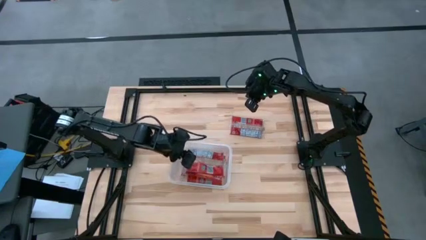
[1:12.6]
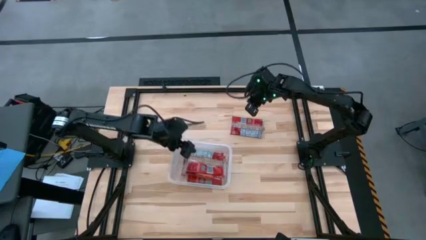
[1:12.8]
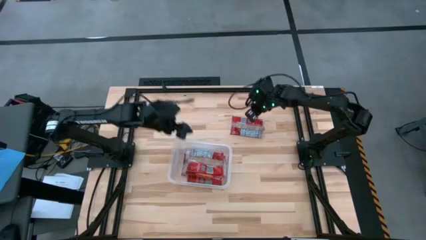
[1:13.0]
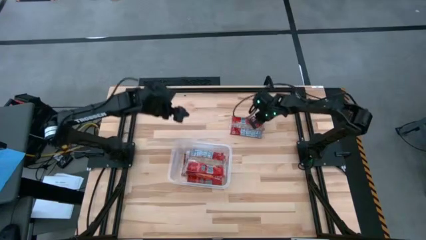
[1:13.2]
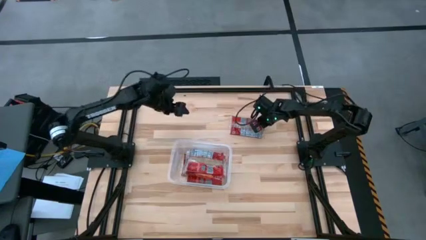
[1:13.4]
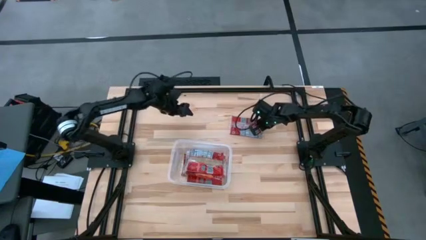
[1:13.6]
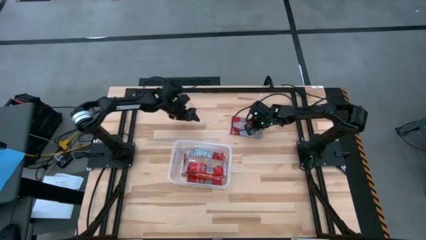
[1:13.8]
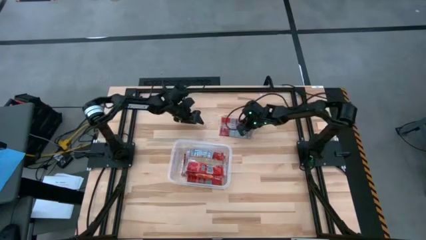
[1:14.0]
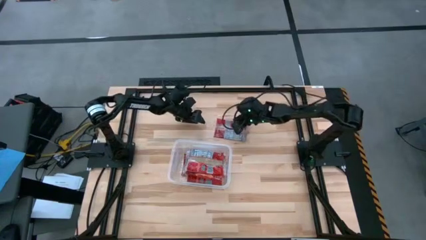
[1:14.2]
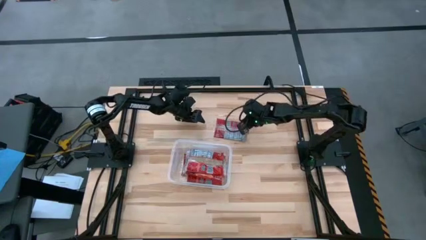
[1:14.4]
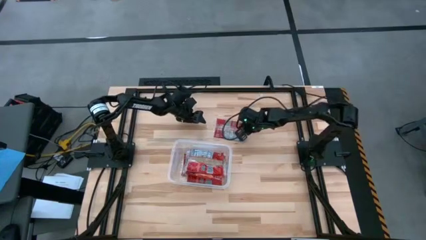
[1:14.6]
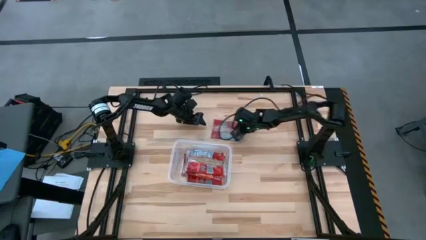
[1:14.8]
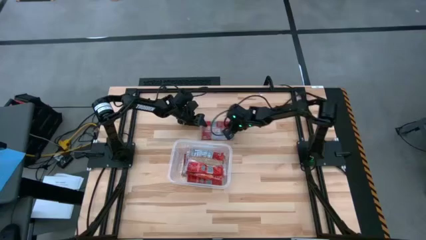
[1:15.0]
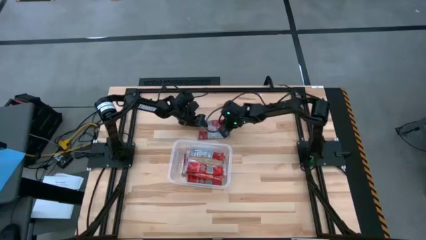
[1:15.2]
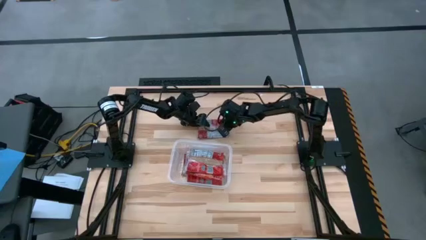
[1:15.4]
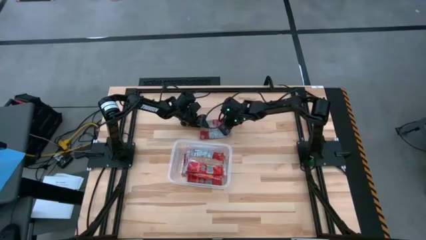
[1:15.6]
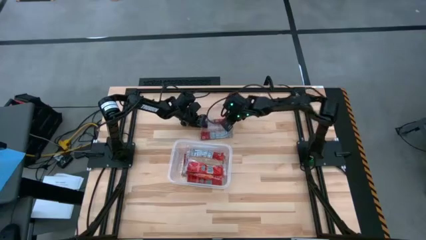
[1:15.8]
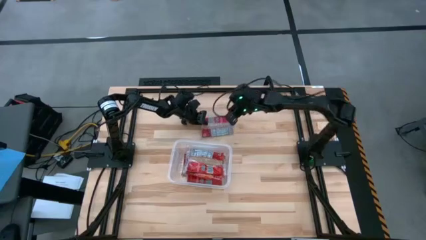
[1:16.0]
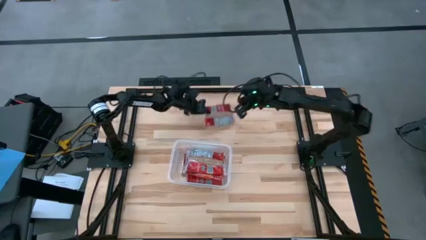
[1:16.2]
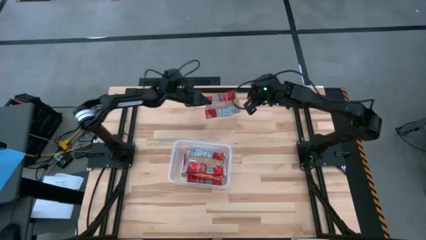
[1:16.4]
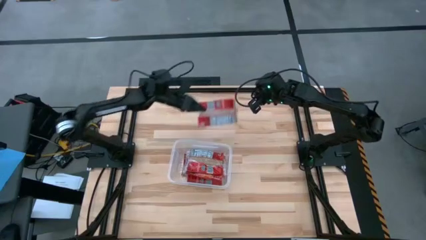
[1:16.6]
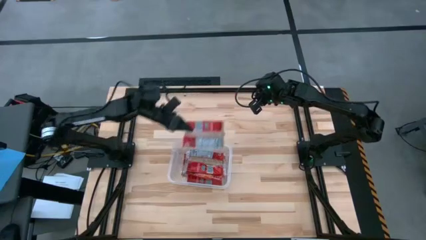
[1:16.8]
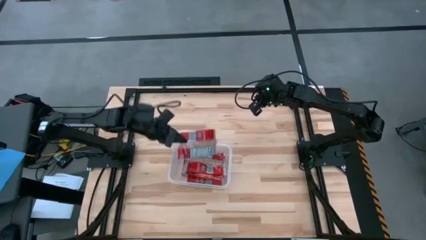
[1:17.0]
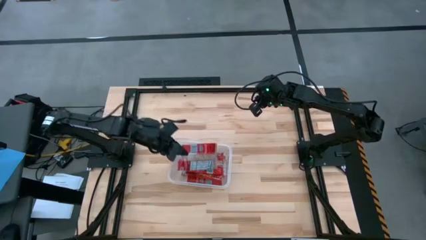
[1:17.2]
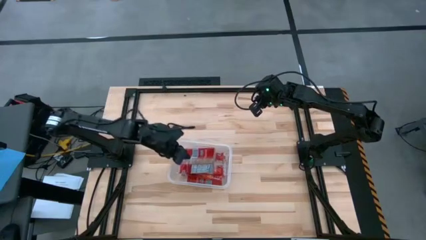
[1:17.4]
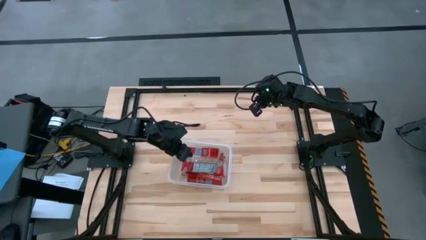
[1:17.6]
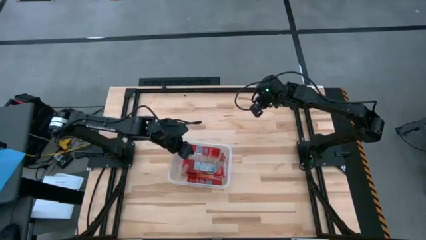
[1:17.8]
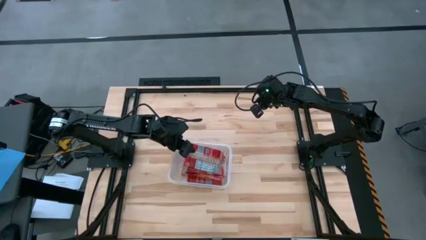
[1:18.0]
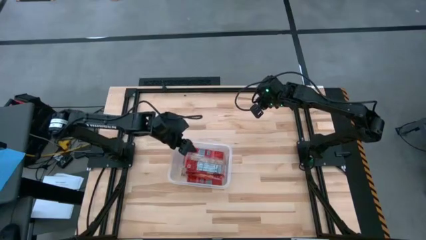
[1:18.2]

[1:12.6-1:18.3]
Task: Sort popcorn bags into baskets
Put the red popcorn bag into the container

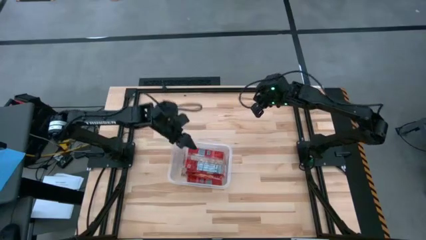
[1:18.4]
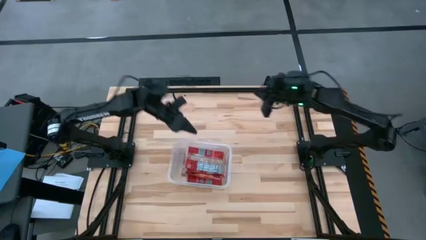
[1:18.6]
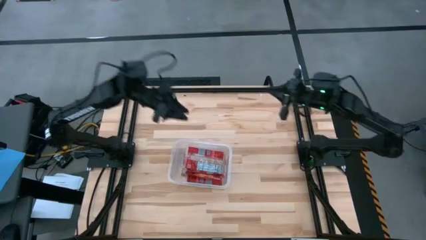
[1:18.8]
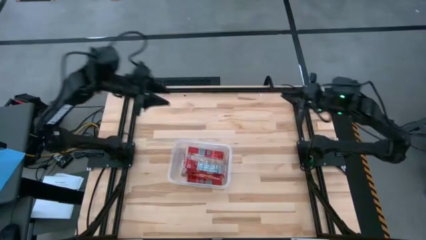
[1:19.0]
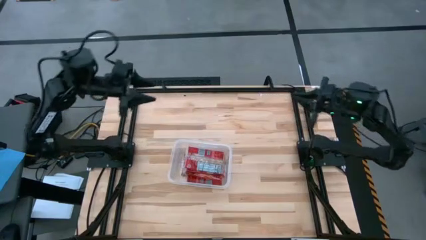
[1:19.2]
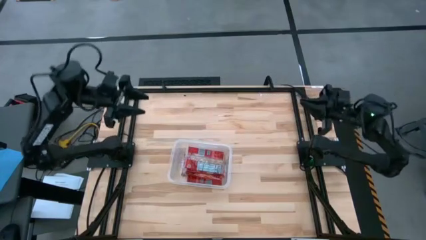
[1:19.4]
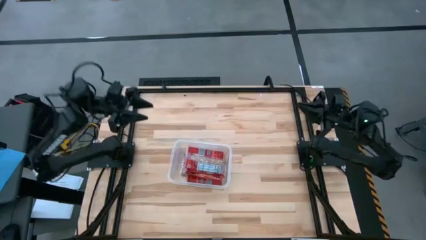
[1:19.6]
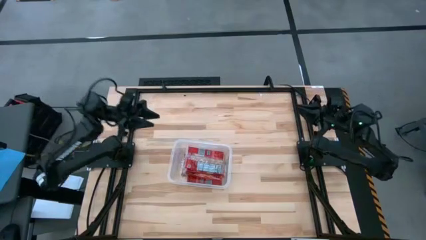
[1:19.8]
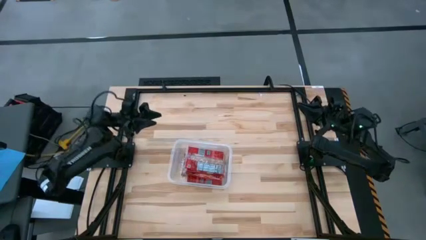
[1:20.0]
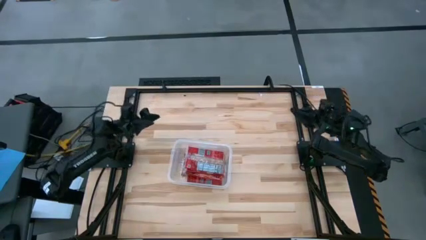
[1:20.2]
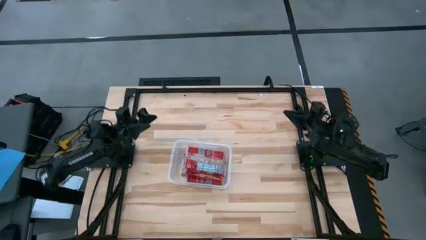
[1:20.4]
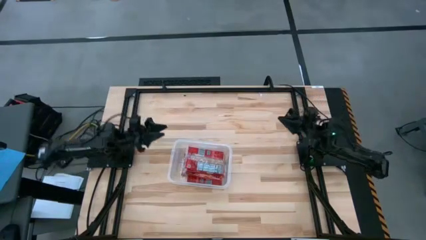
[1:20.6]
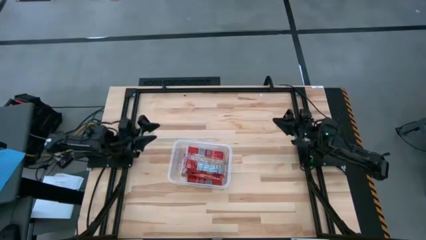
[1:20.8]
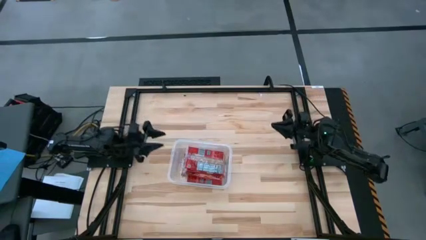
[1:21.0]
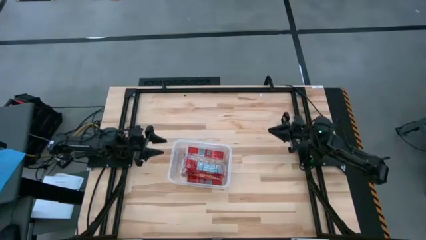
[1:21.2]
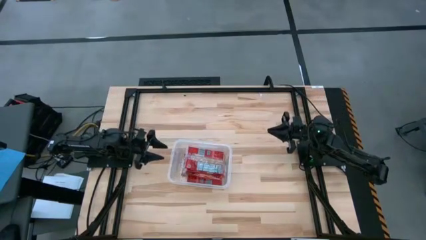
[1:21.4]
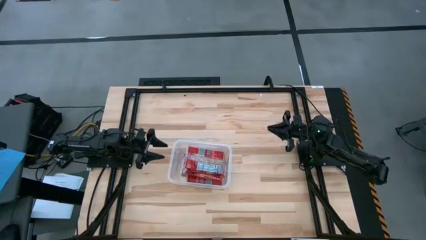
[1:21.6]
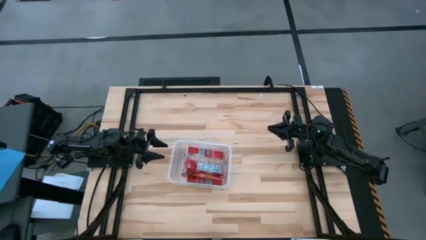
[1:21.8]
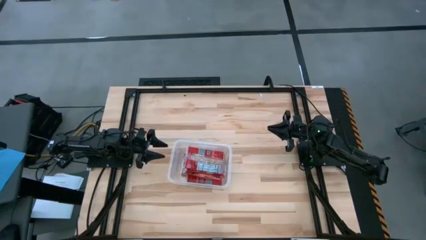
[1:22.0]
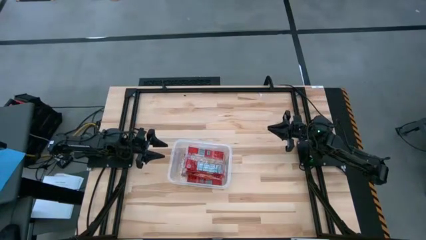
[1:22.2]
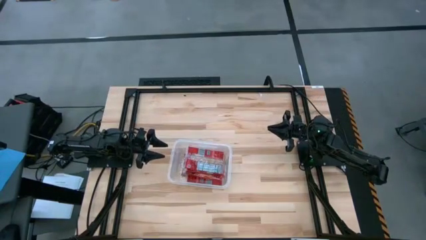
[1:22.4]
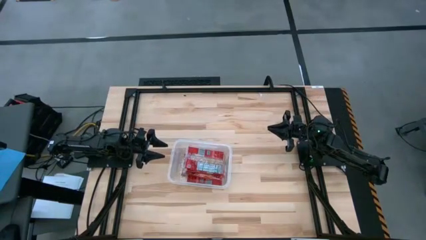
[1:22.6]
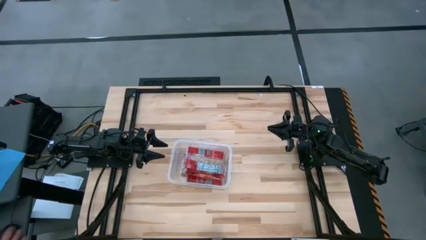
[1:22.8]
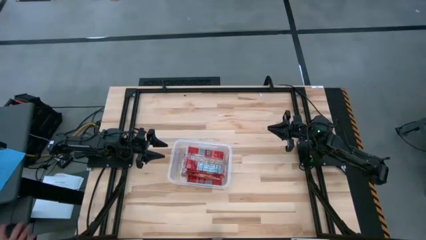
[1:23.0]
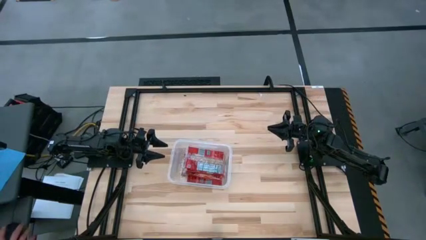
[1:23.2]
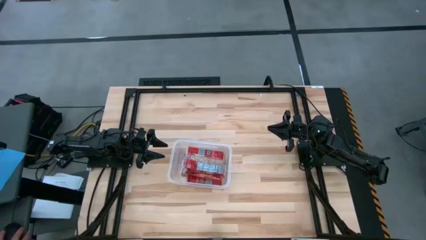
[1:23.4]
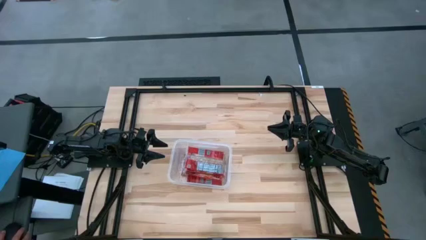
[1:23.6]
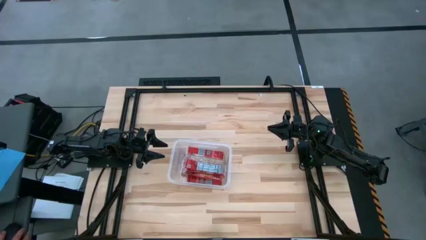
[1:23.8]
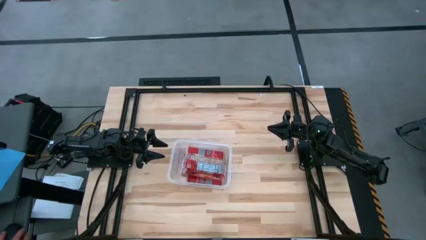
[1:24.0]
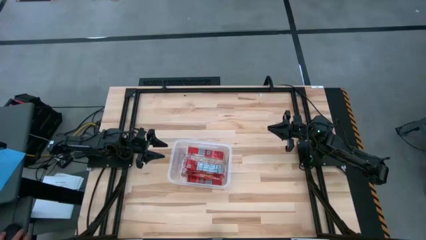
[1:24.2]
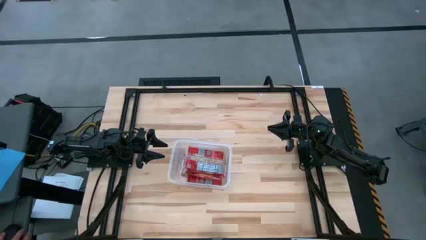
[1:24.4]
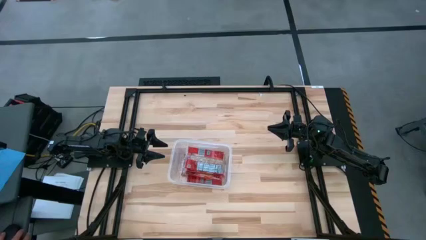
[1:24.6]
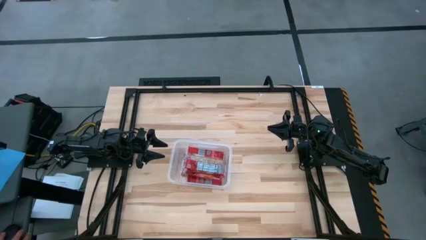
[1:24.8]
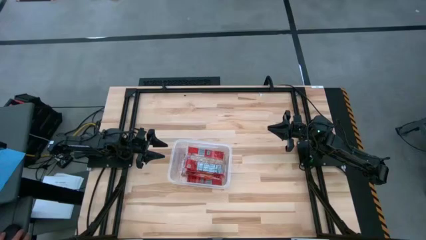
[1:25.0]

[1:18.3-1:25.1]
Return to Home Position

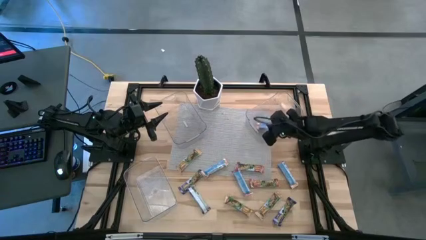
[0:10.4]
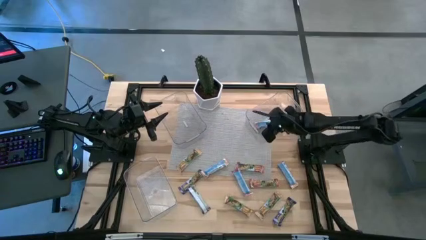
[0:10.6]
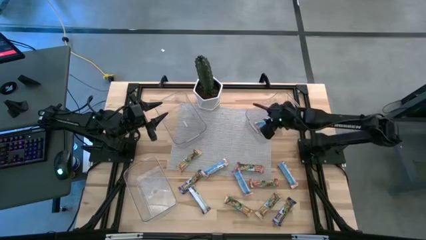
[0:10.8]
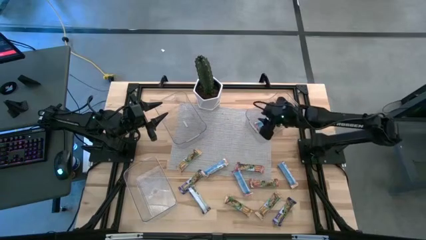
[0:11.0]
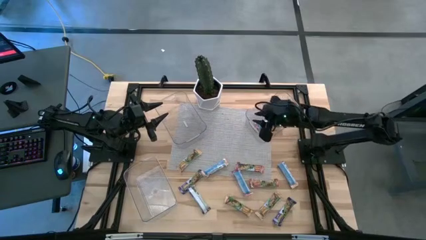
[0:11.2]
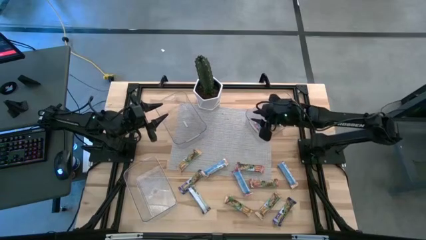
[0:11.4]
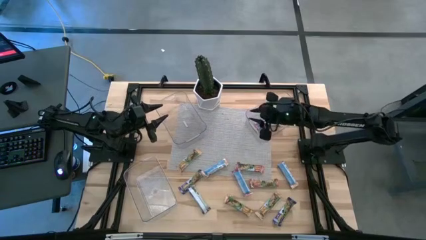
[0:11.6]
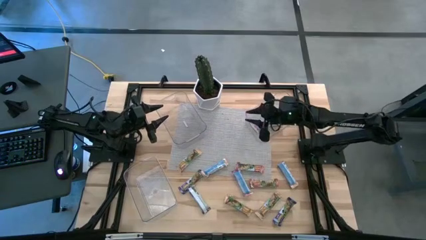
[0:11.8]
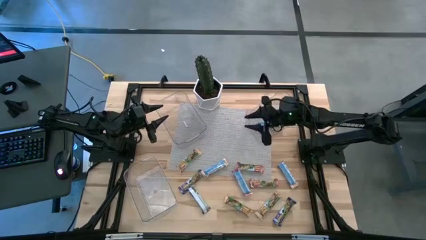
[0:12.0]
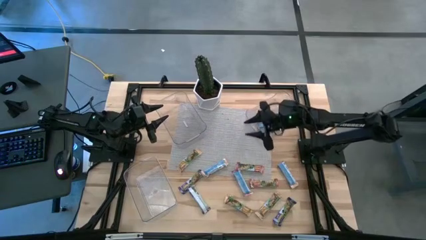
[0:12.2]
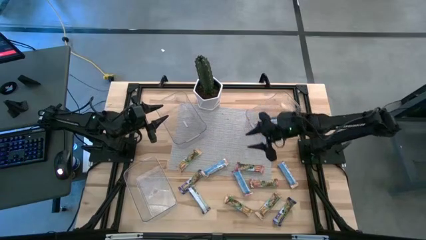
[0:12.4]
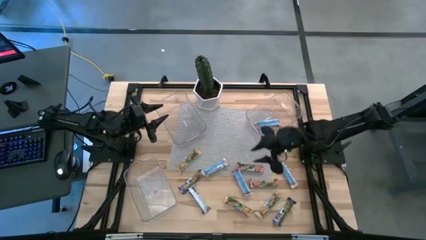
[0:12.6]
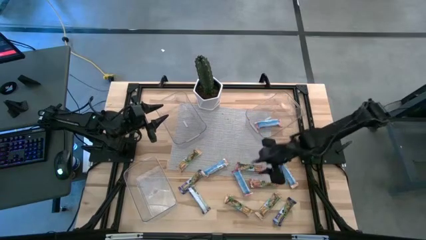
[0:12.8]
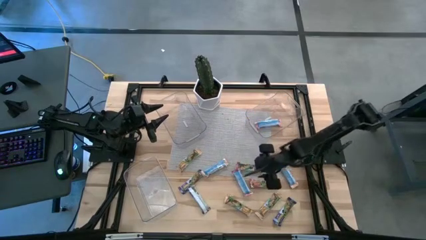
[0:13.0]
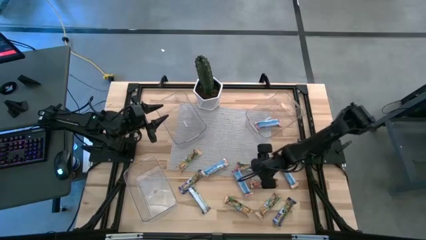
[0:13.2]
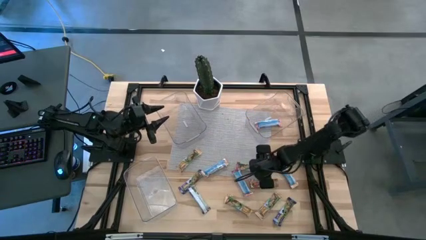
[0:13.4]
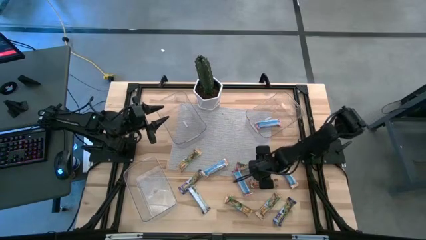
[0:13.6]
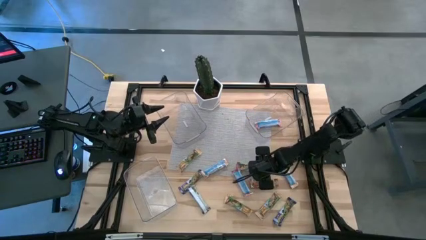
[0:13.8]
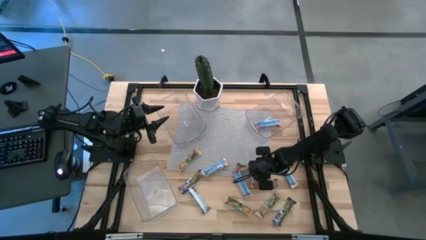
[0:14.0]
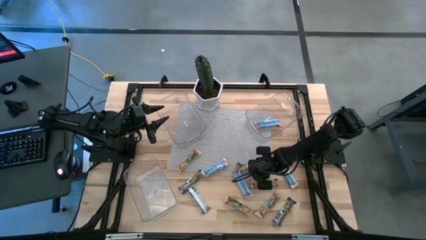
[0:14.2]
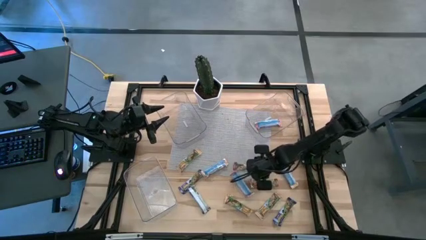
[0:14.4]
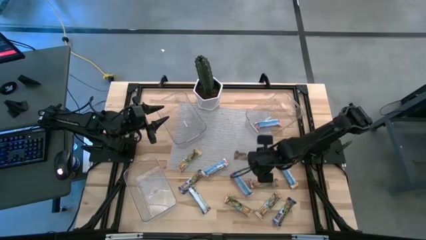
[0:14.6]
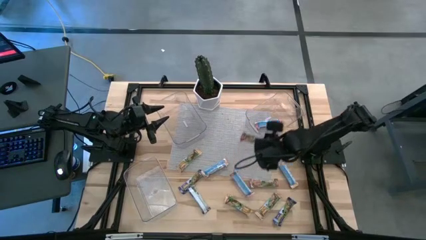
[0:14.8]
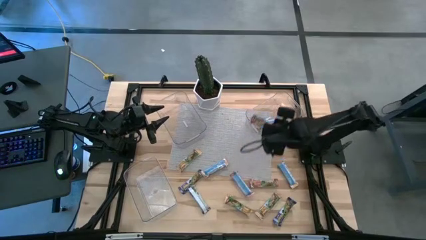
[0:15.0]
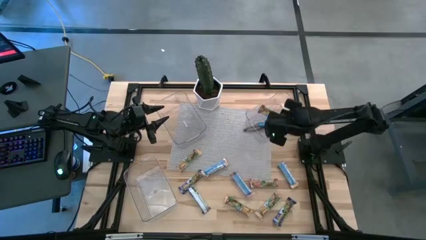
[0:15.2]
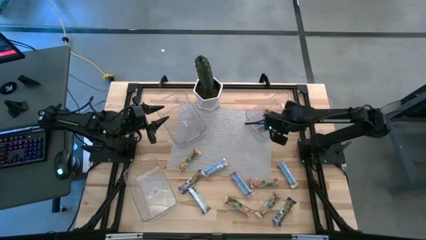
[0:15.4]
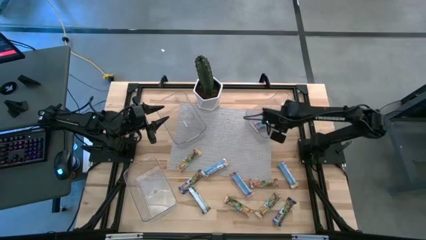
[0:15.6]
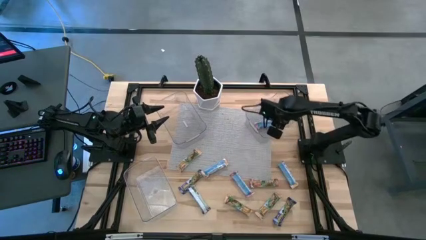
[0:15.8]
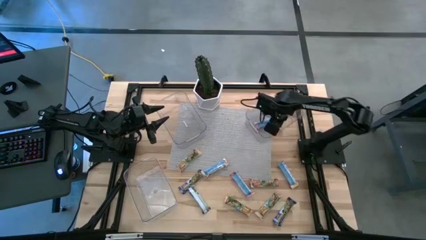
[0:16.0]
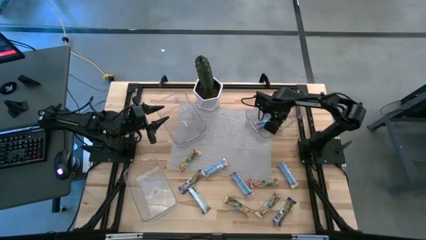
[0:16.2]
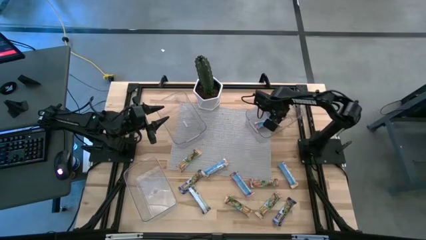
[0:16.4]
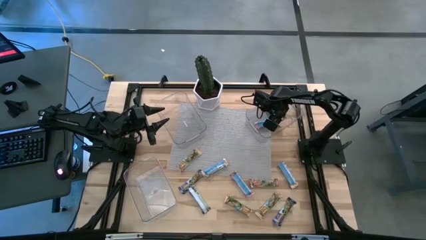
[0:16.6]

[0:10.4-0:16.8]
Task: Pick and place Granola Bars by type
Put the red granola bar into the top right transparent bin
